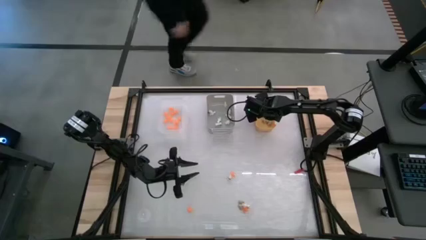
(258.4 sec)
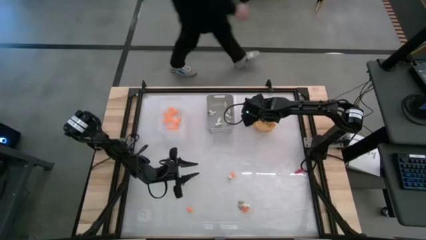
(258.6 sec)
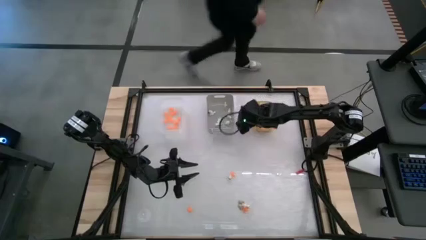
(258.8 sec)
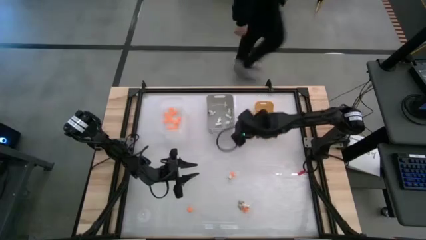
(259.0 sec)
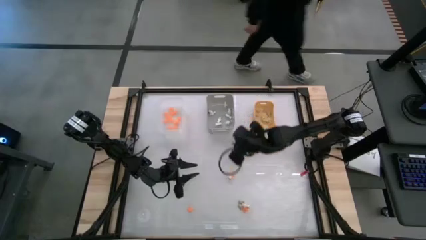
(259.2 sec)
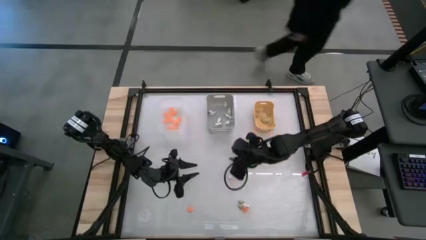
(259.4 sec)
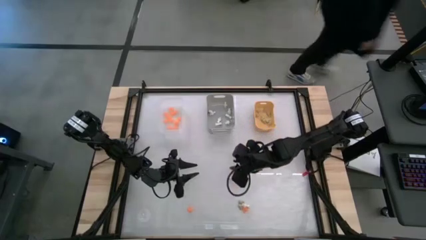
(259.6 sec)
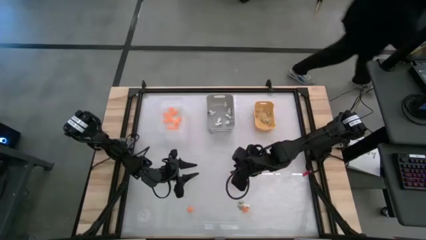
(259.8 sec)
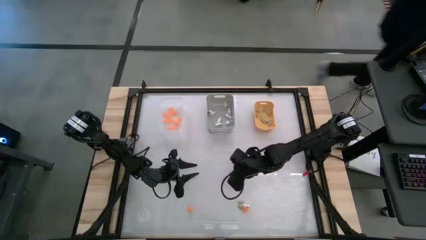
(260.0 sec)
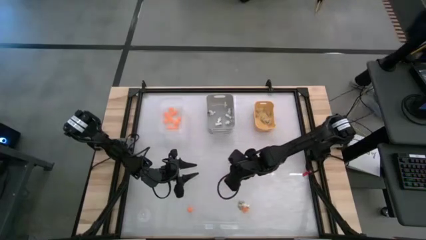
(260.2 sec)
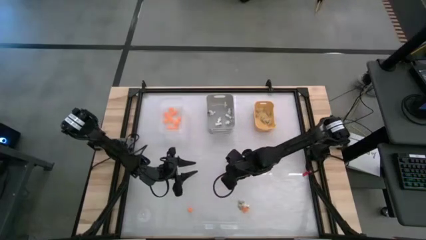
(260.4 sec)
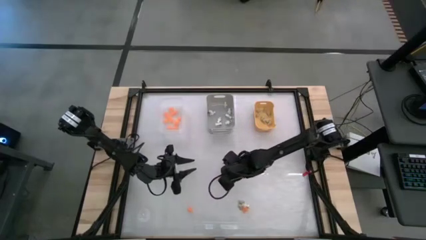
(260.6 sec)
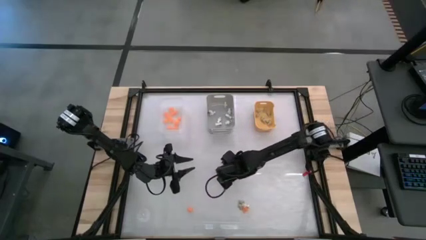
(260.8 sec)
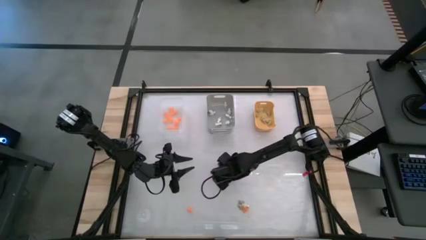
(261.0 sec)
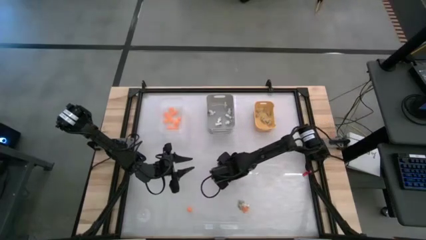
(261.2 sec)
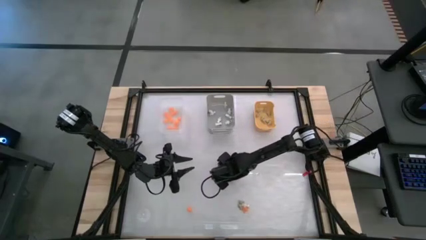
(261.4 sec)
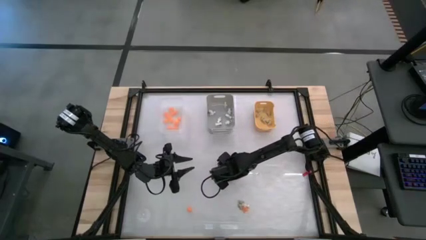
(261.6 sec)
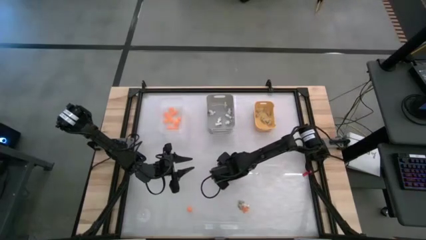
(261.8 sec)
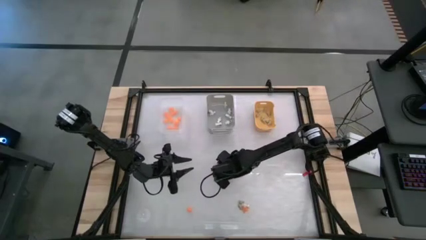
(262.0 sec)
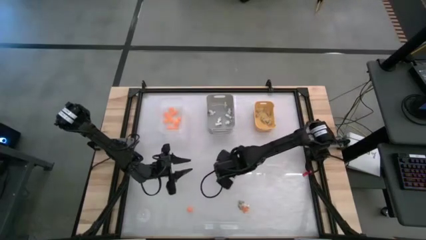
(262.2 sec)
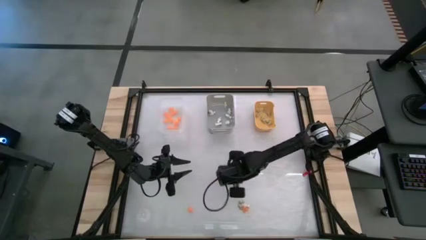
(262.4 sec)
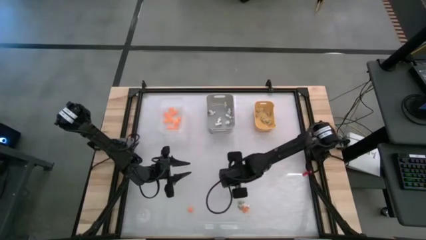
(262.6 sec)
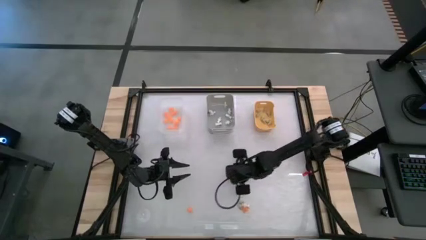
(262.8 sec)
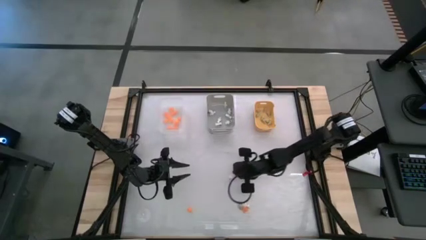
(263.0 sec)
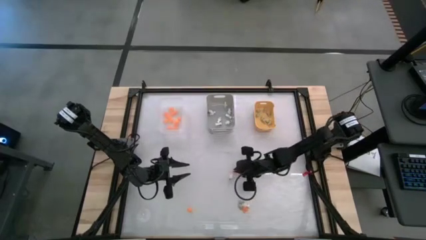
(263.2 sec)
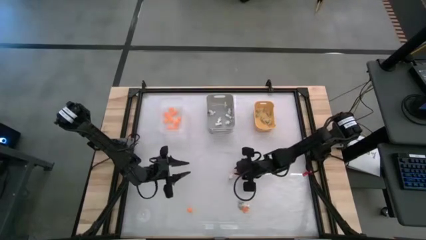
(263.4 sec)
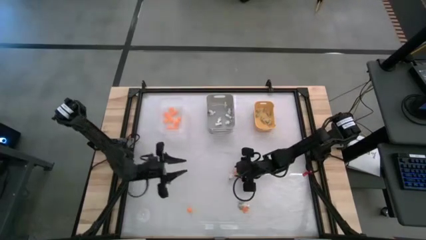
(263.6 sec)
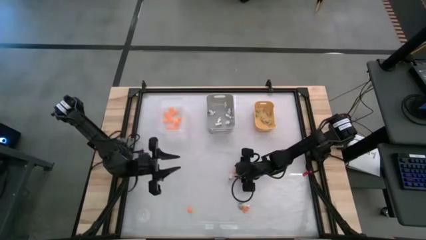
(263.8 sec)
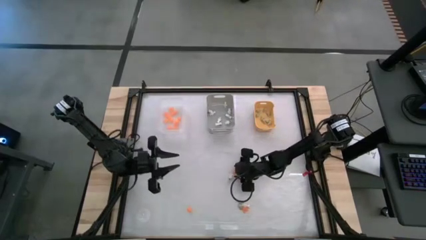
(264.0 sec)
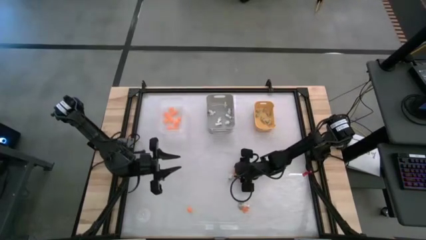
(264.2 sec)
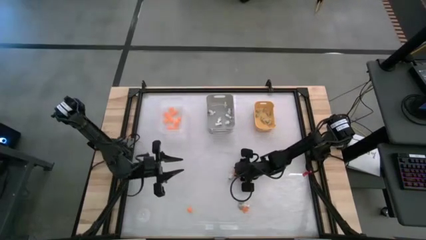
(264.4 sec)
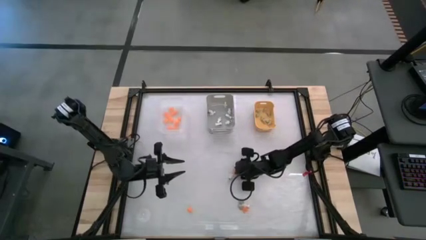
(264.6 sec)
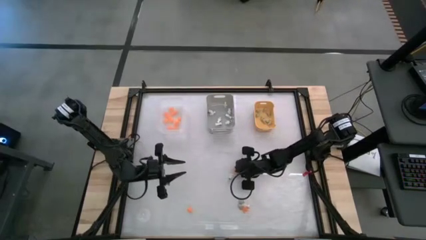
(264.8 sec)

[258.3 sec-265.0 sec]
Task: Sort Halloween decoration
Put the orange spider toy into the transparent white bin

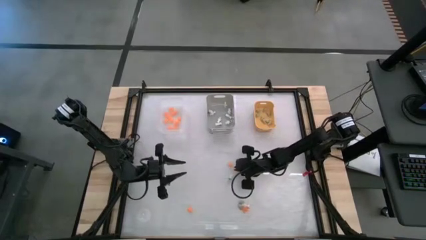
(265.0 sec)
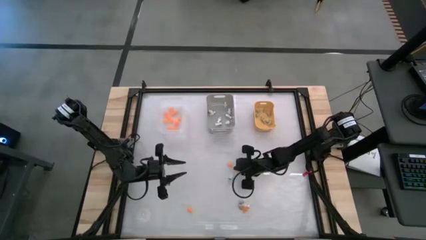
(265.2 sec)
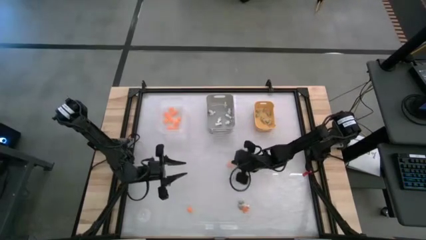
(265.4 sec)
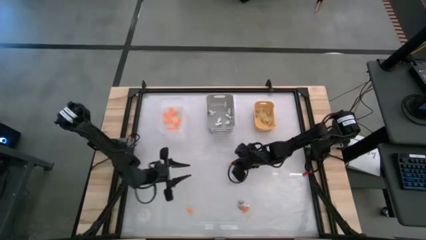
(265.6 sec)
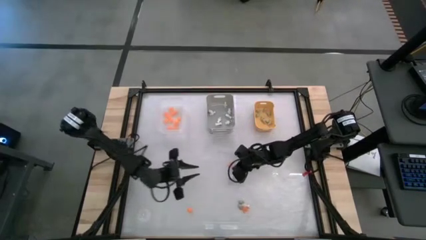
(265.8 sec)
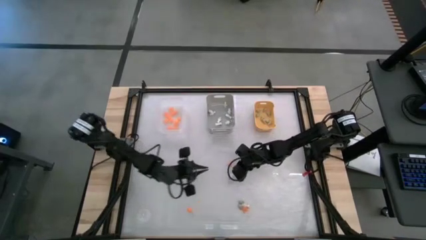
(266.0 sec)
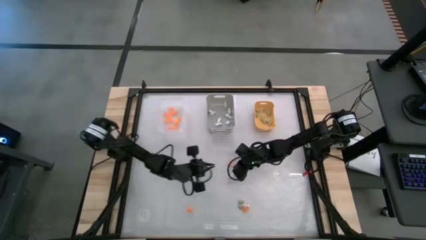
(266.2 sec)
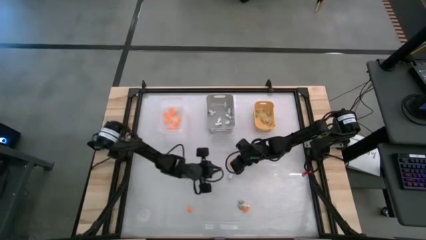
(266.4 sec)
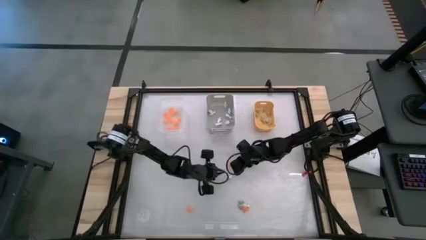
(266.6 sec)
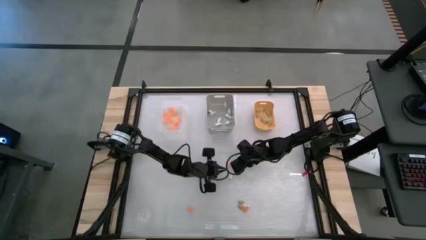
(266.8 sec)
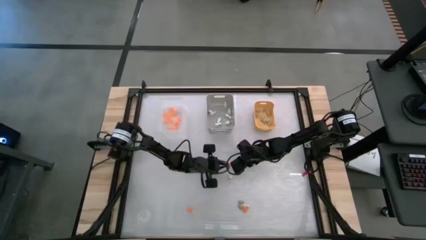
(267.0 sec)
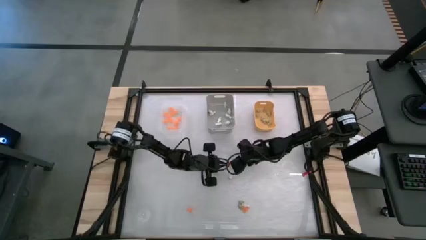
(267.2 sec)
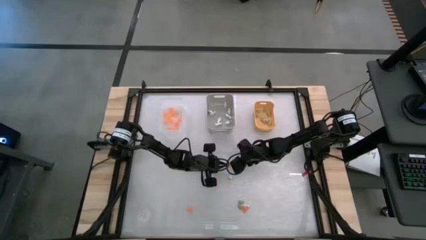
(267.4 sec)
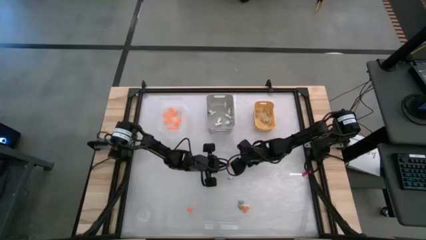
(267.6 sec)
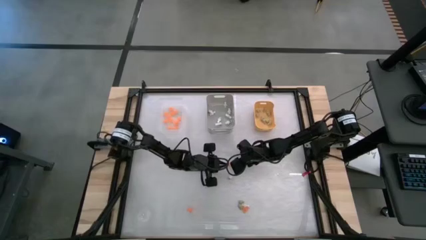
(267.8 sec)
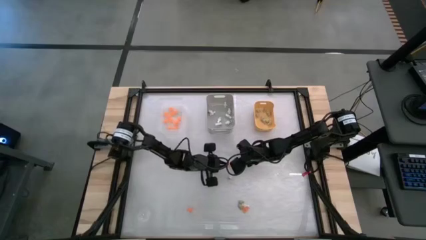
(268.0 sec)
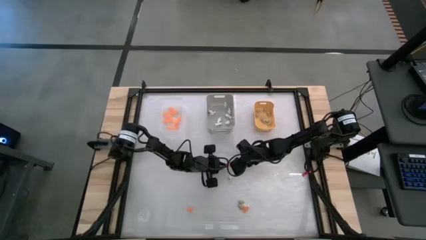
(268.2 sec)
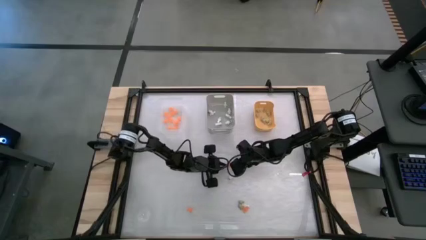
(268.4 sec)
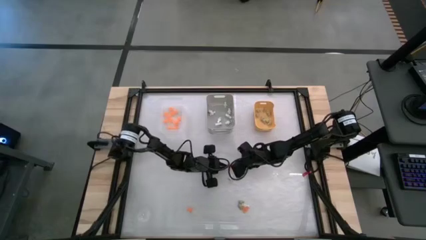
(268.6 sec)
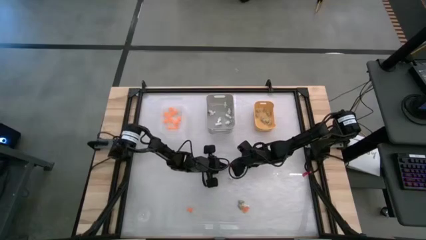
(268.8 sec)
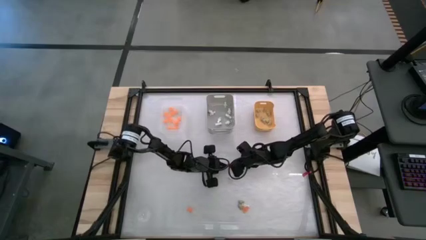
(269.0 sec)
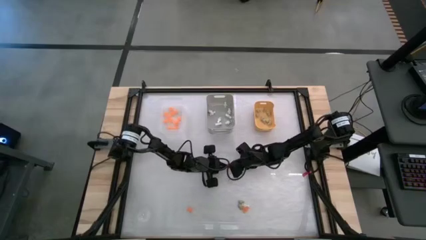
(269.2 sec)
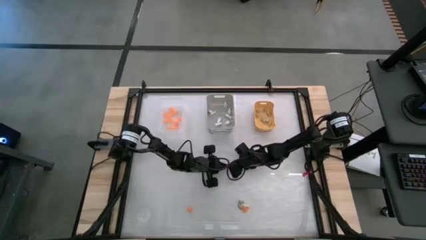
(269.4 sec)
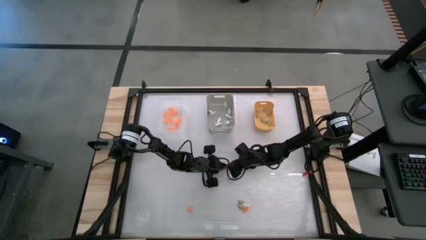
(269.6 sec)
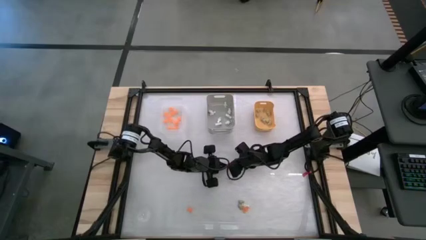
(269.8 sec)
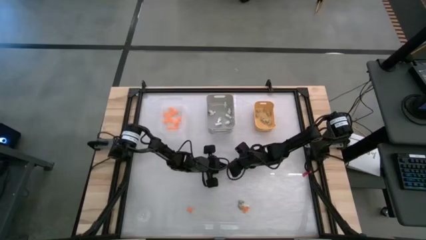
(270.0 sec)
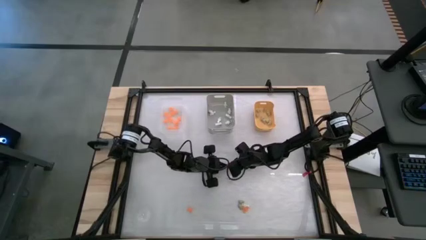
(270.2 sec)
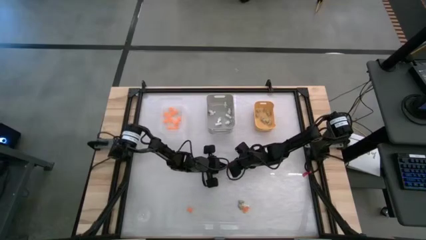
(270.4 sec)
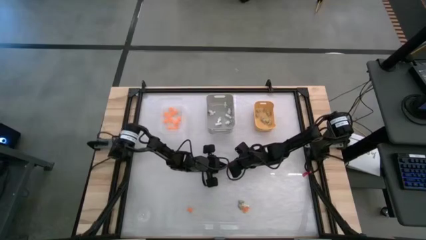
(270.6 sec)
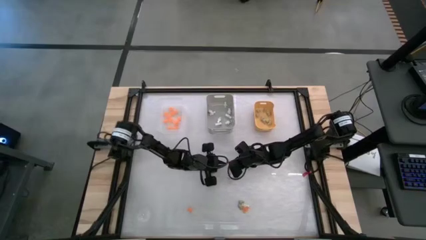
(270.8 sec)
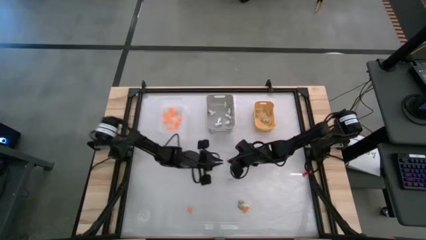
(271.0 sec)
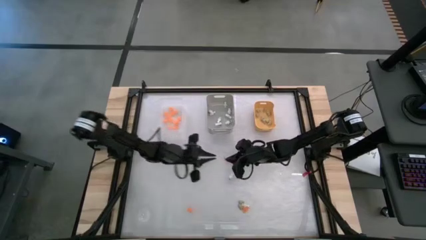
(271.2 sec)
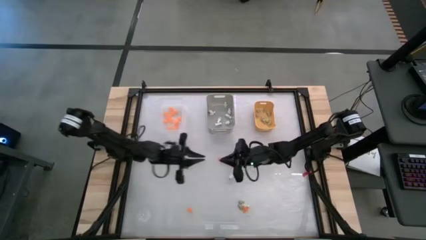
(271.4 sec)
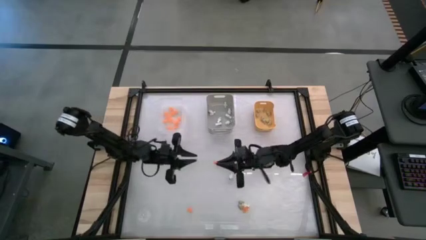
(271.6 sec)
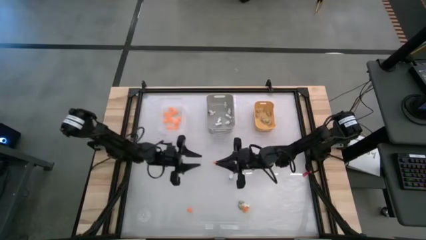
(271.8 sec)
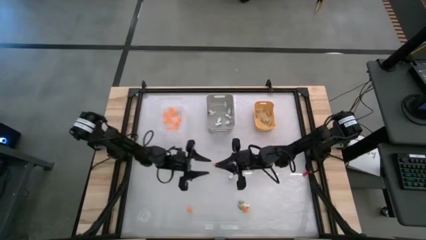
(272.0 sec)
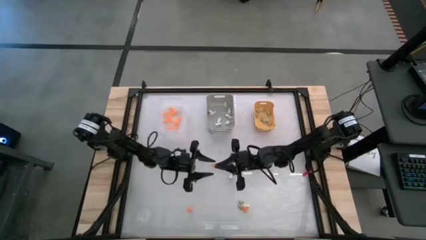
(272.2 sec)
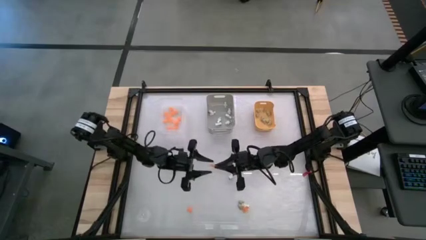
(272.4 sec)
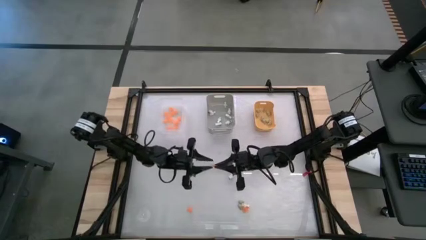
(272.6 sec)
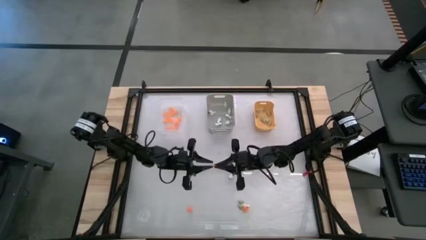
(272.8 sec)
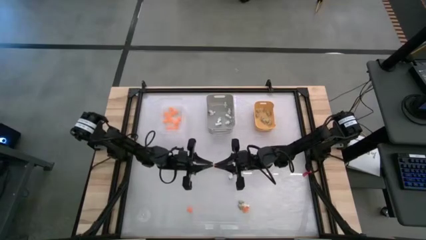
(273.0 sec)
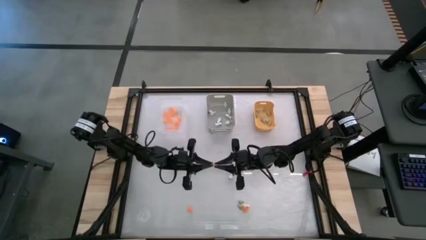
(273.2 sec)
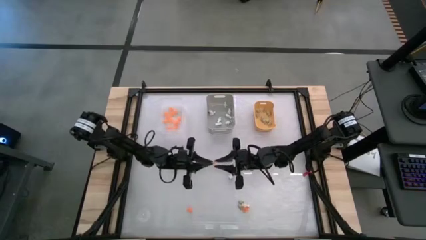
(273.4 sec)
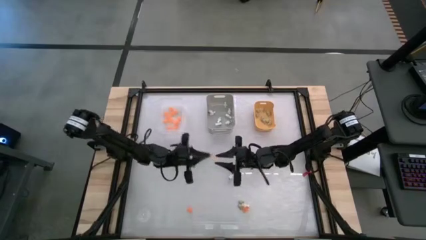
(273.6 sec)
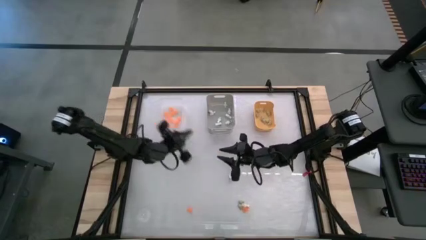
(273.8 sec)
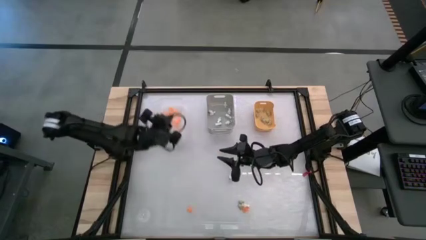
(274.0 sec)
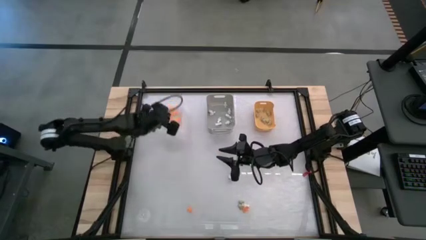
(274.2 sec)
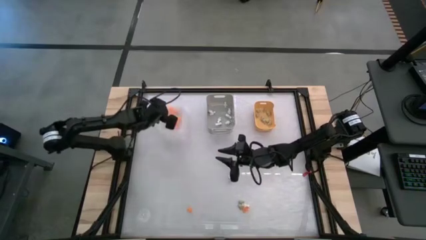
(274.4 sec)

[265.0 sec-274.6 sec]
Put the orange spider toy into the transparent white bin
